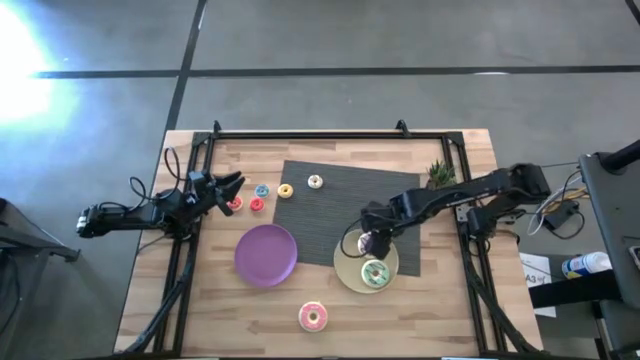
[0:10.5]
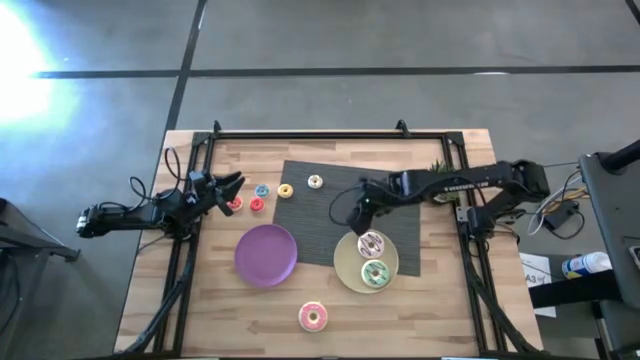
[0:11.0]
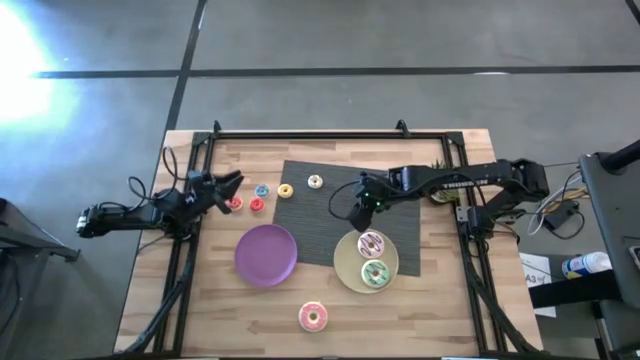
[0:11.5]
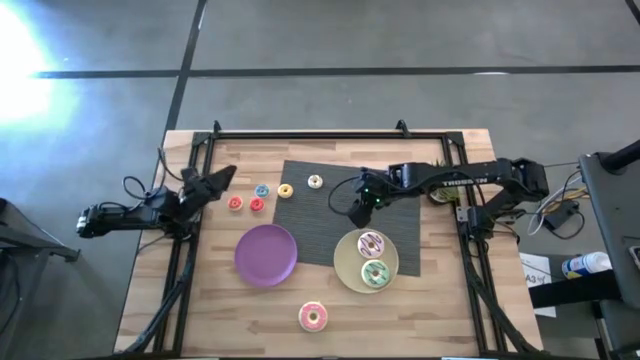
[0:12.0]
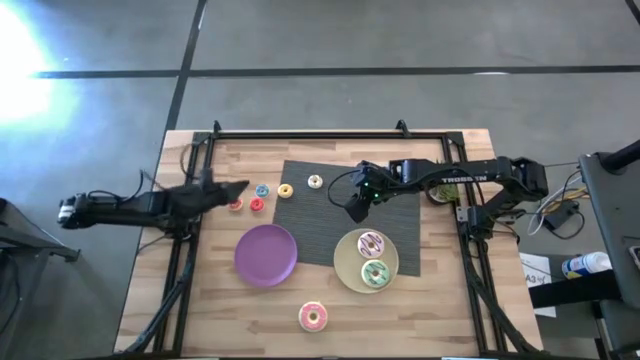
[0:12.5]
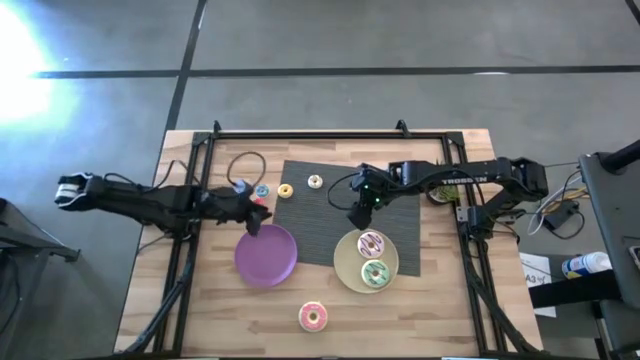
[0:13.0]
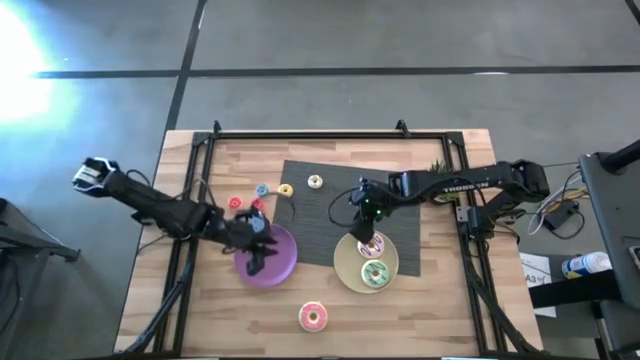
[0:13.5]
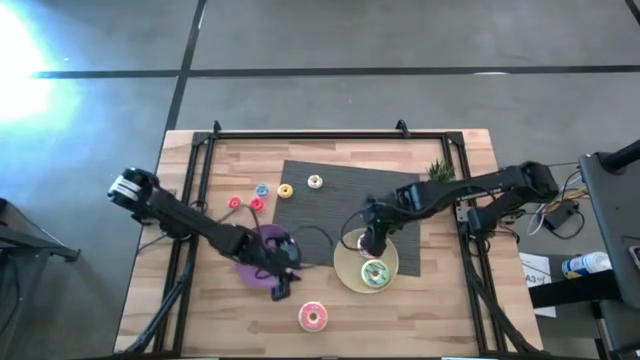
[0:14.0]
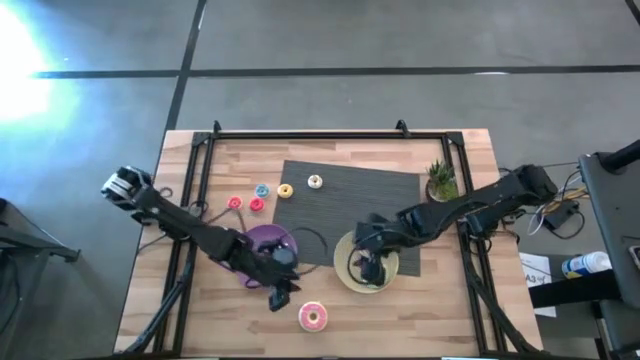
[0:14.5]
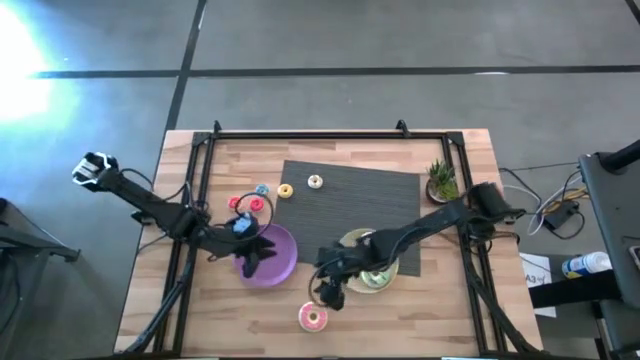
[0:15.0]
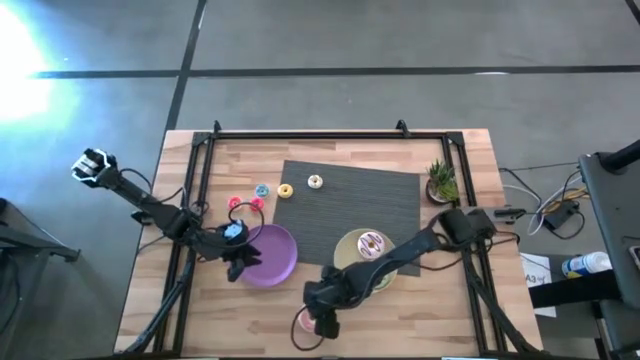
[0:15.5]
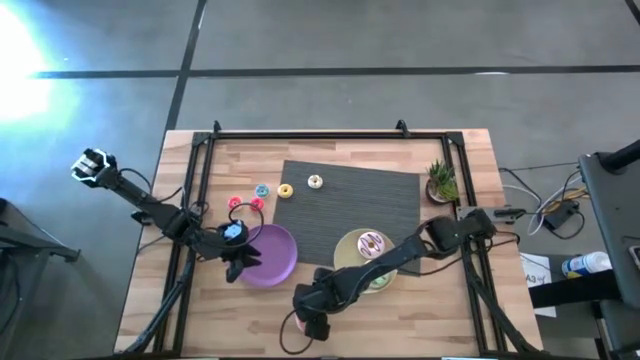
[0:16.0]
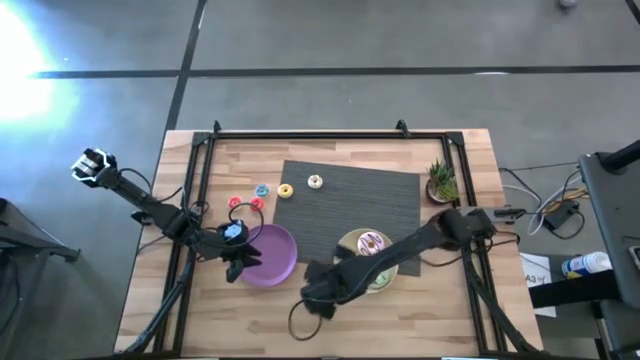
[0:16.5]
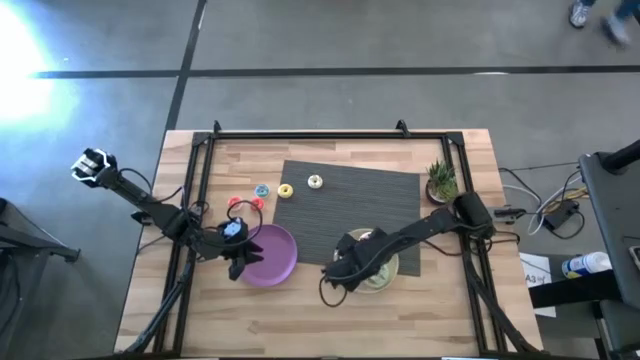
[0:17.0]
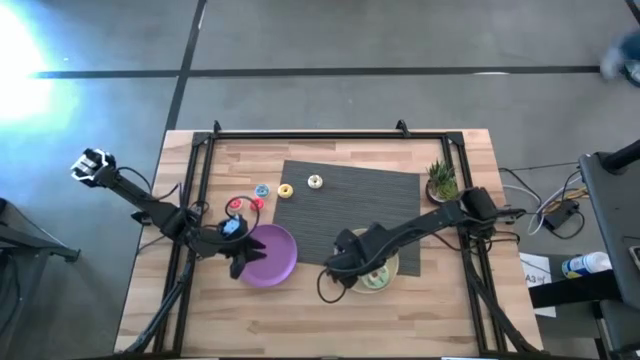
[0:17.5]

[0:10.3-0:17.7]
Task: Pick & Place donuts
Put the large pink donut on the white plate

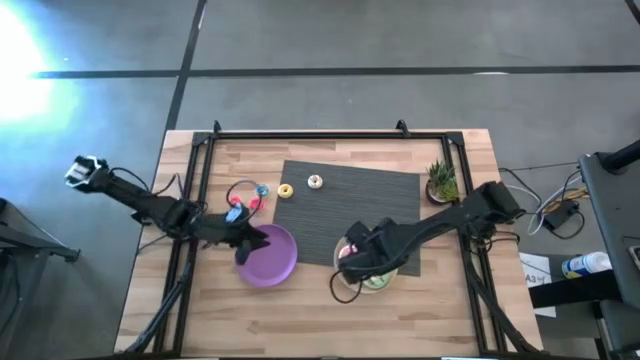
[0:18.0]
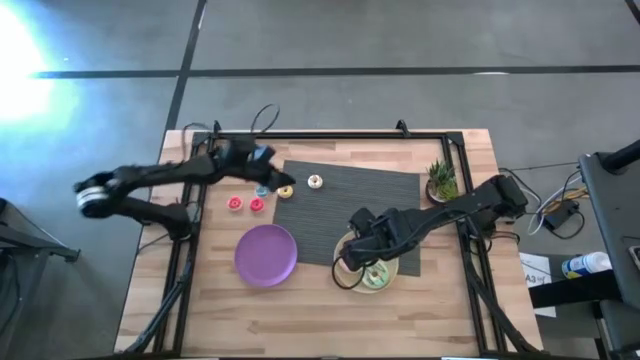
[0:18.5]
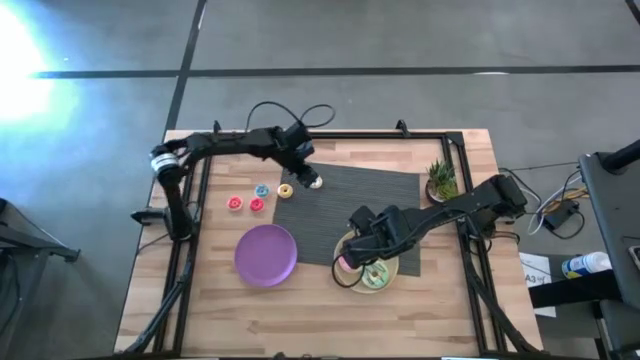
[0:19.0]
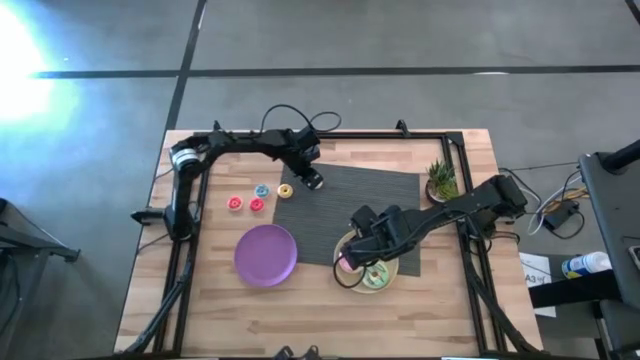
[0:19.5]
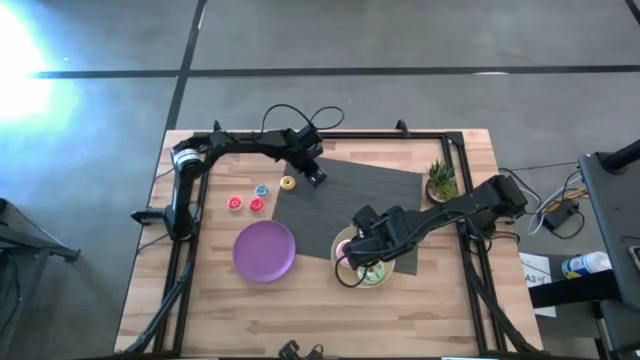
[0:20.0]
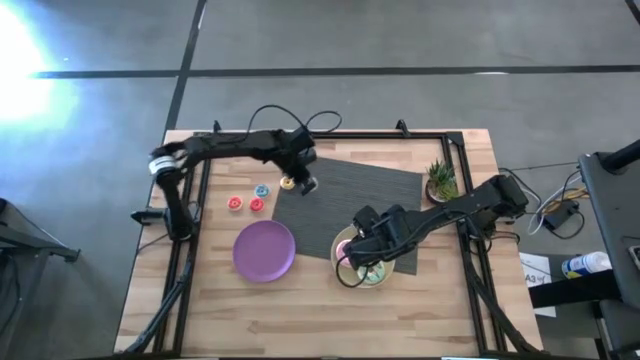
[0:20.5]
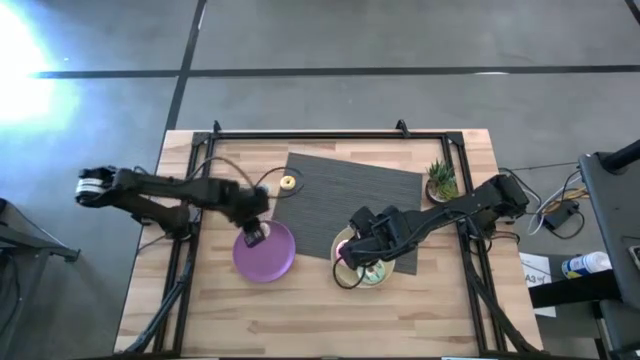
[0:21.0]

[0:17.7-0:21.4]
Put the small white donut on the purple plate

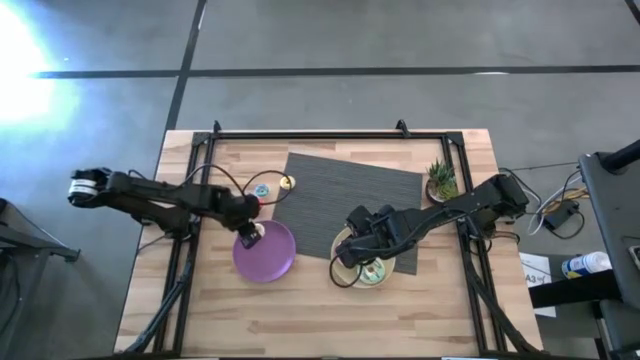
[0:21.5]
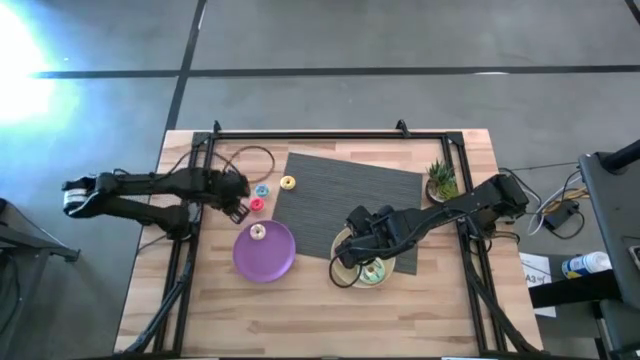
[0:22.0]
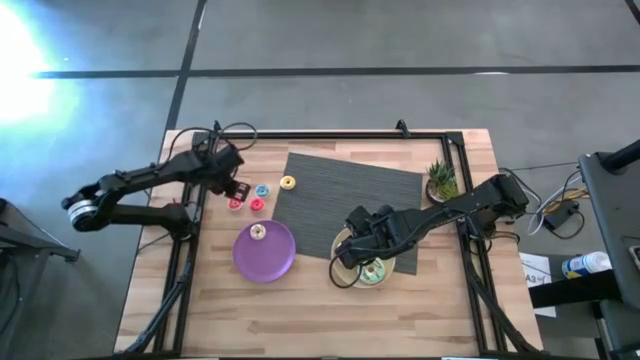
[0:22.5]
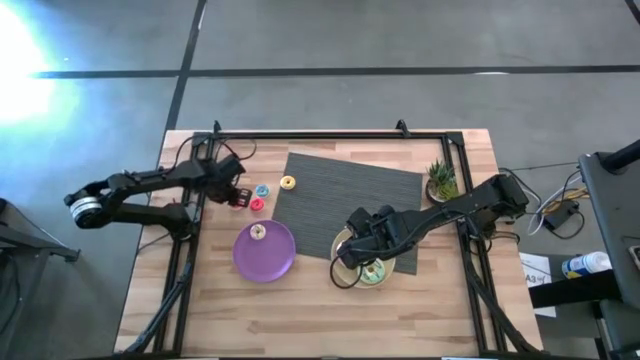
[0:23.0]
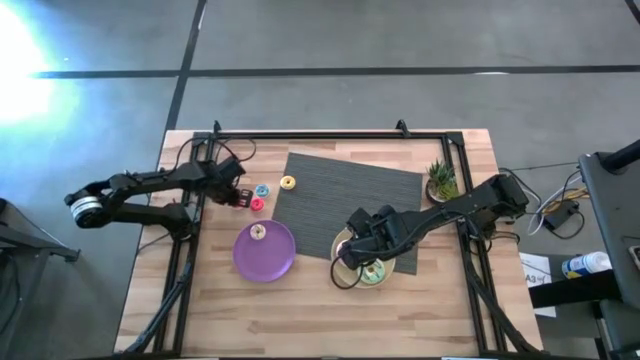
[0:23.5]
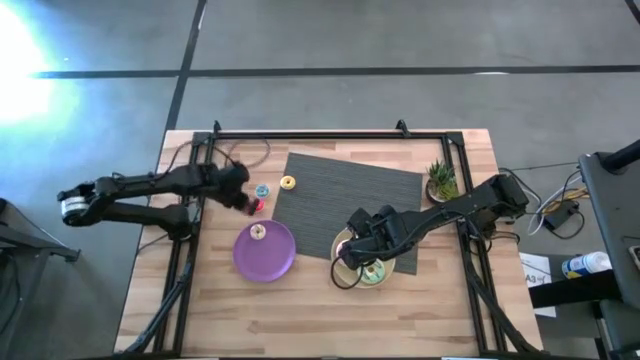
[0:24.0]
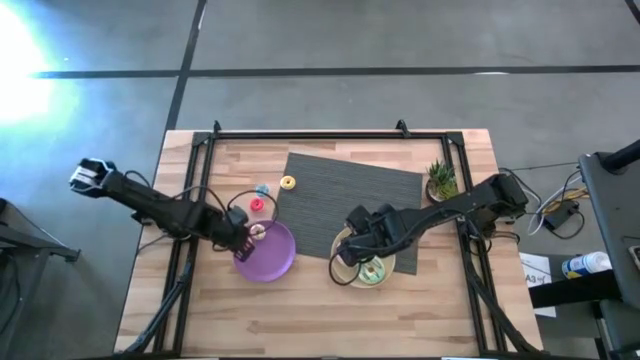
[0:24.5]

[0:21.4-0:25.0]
Put the small orange donut on the purple plate

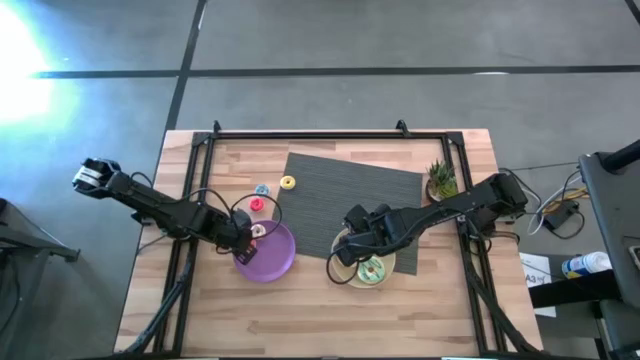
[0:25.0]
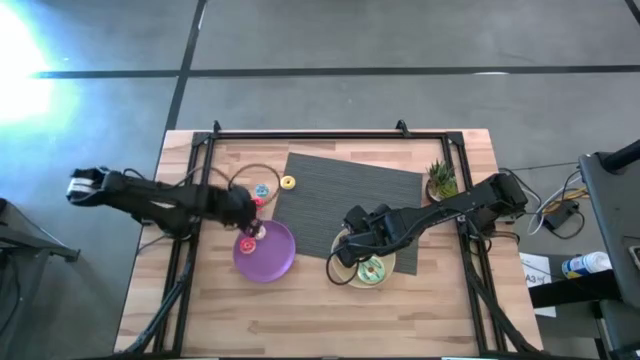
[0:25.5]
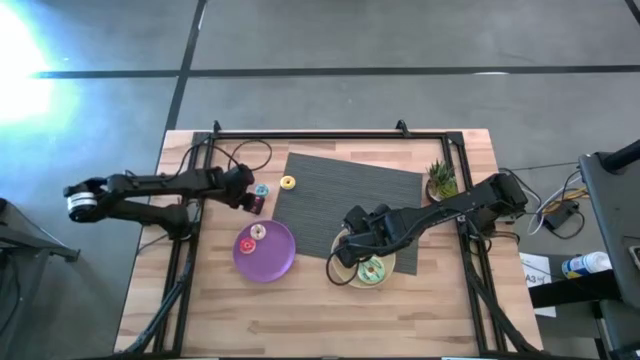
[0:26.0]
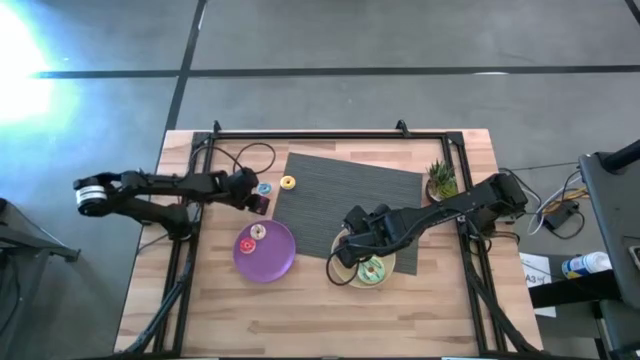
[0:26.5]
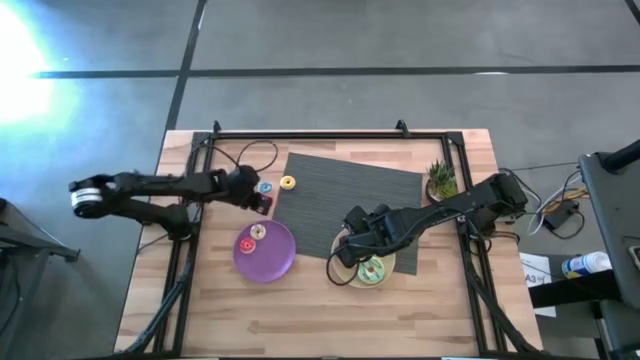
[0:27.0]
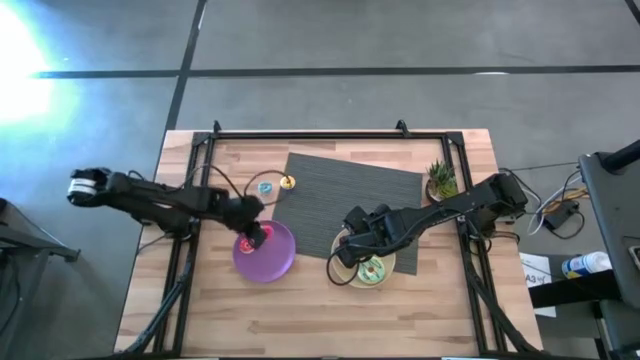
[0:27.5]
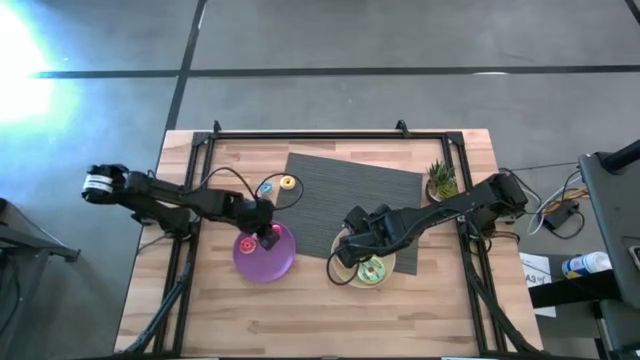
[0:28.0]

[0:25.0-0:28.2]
Put the small red donut on the purple plate

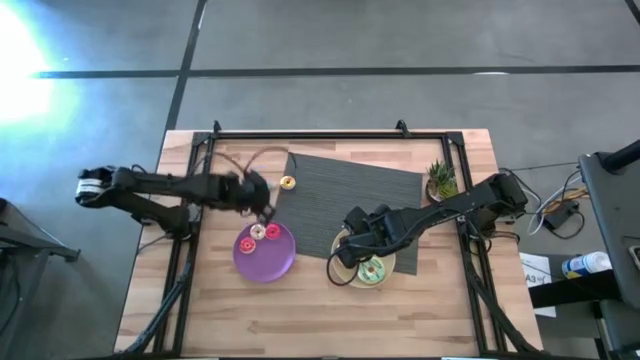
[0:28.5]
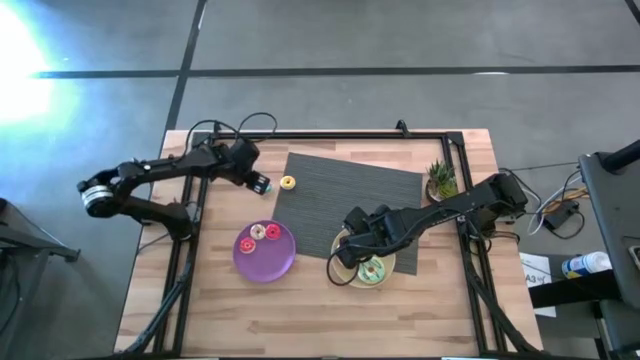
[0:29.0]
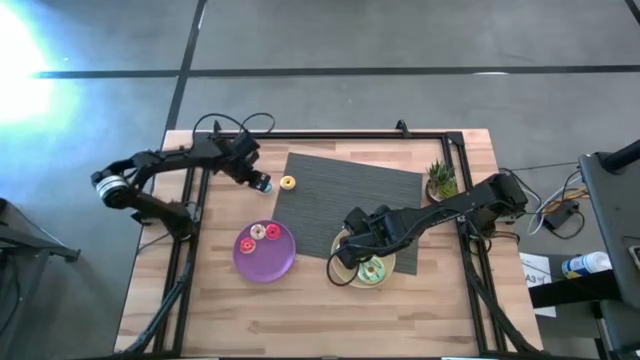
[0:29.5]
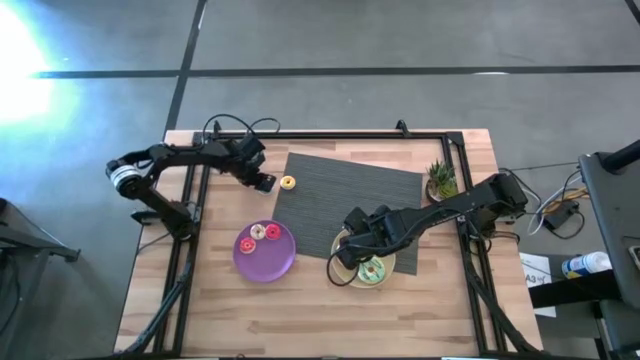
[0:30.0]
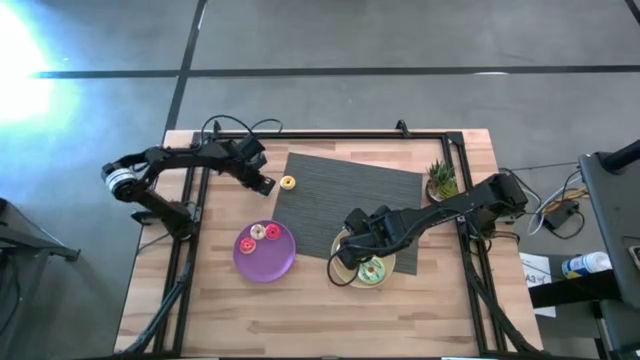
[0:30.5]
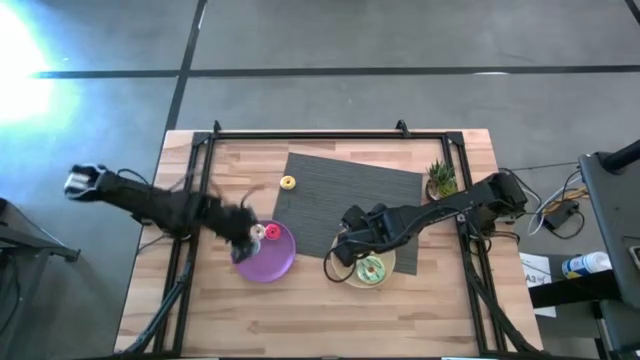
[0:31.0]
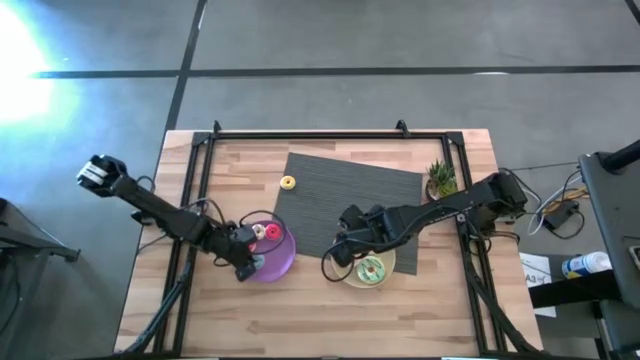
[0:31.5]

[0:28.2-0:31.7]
Put the small blue donut on the purple plate
